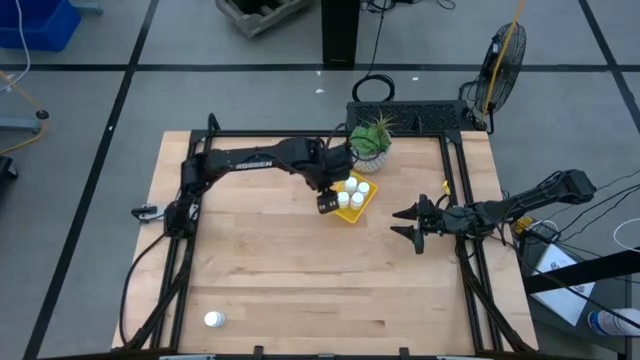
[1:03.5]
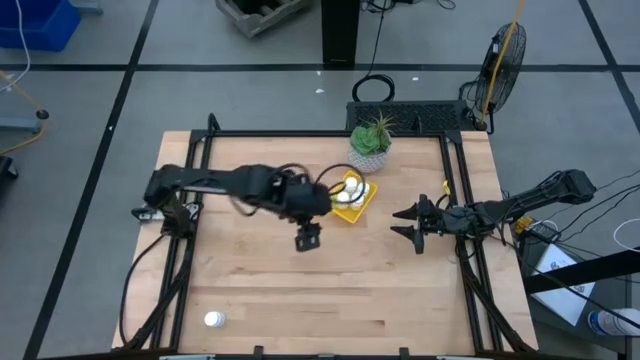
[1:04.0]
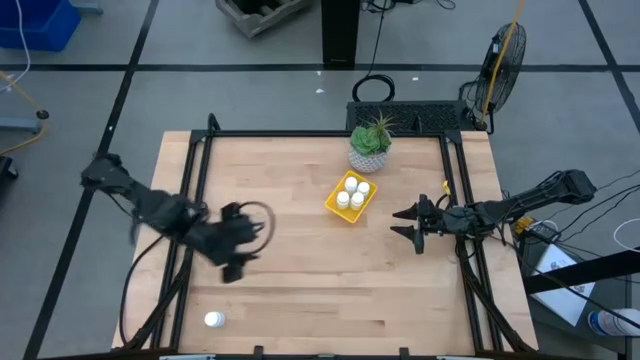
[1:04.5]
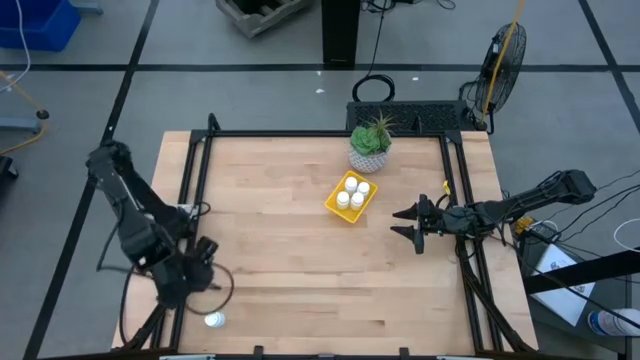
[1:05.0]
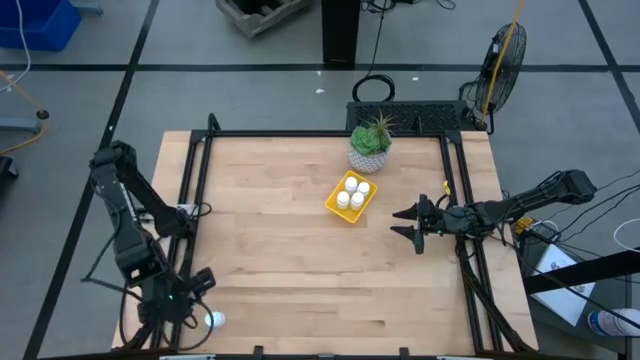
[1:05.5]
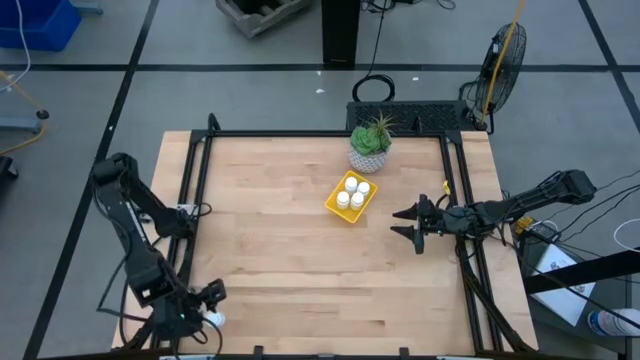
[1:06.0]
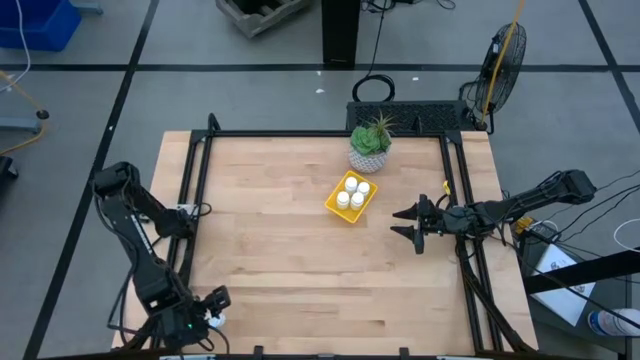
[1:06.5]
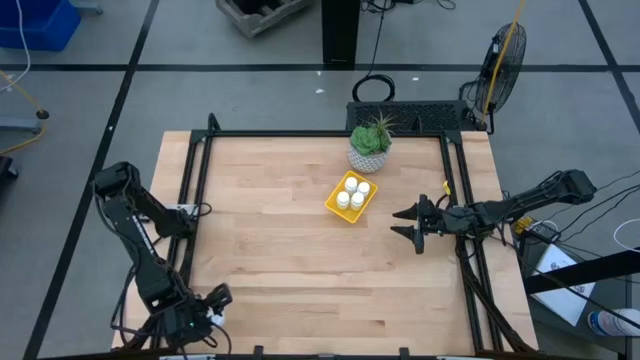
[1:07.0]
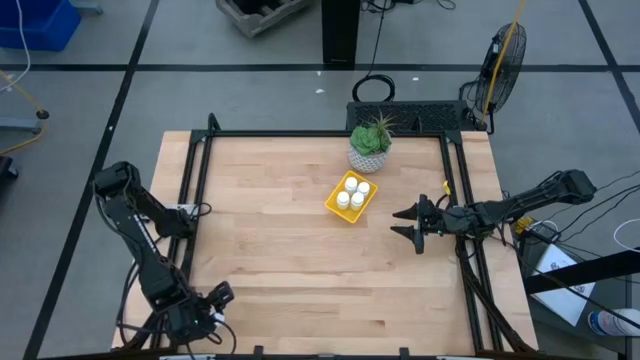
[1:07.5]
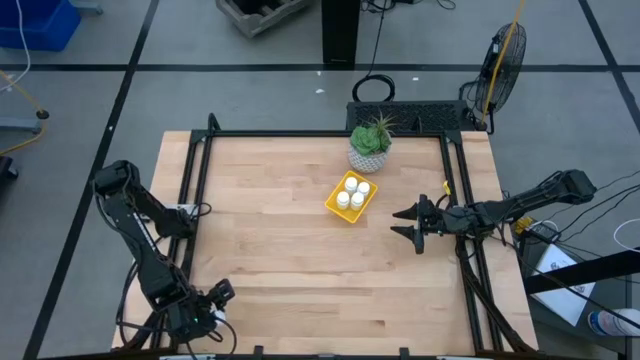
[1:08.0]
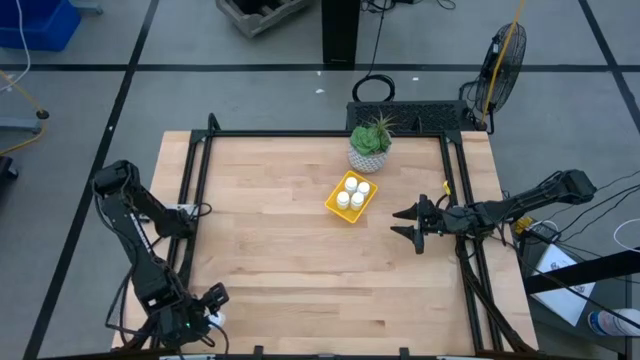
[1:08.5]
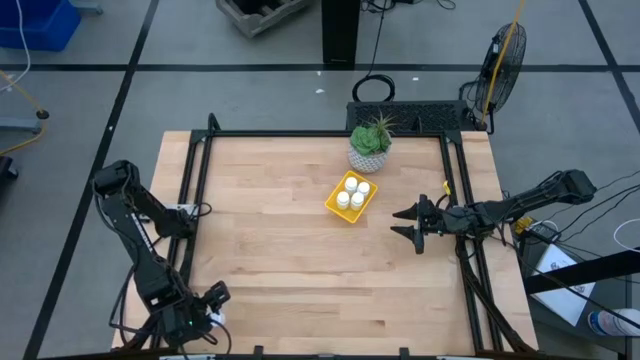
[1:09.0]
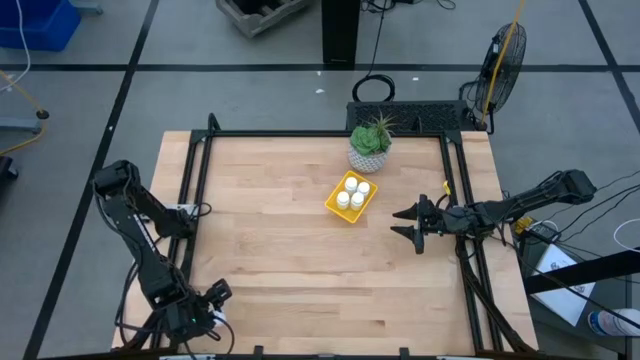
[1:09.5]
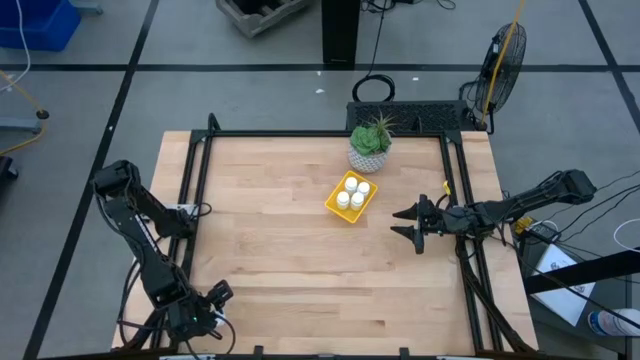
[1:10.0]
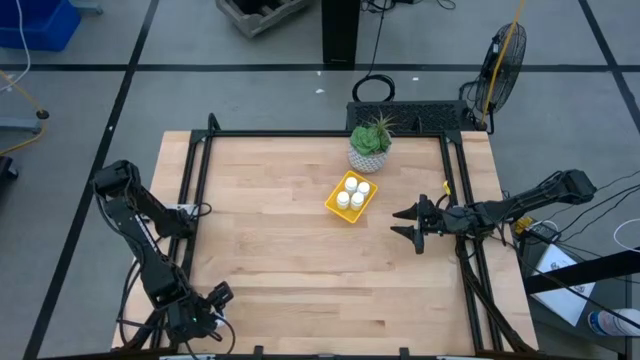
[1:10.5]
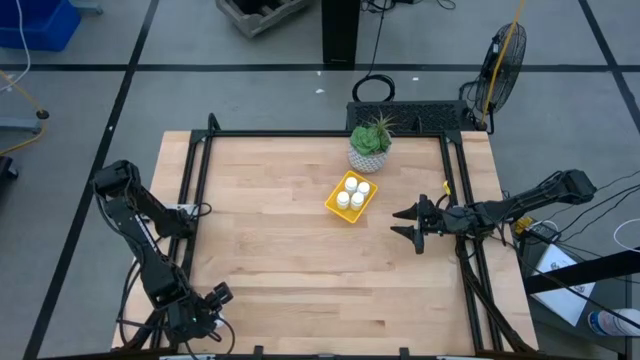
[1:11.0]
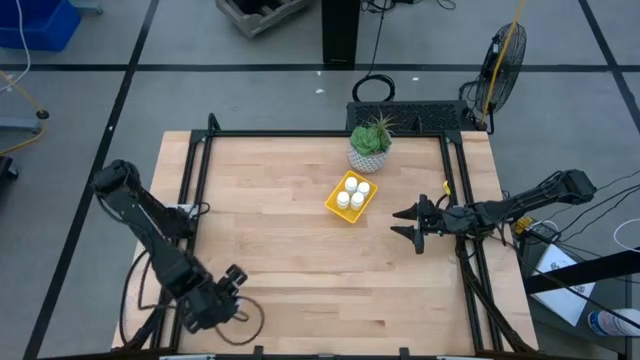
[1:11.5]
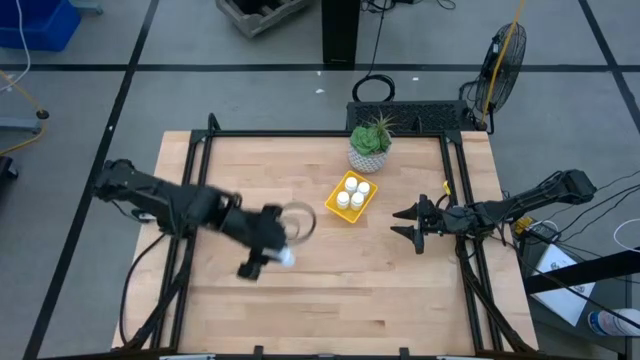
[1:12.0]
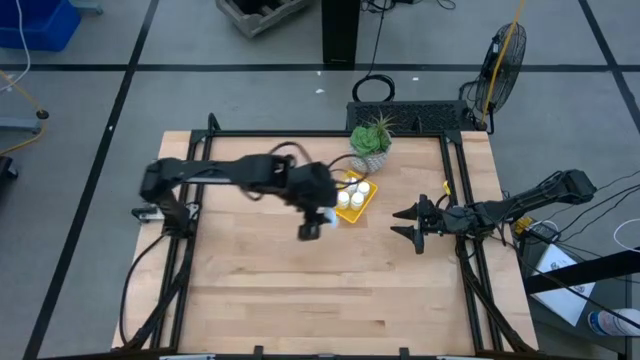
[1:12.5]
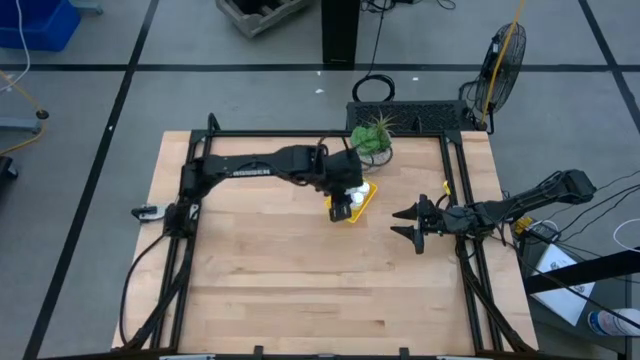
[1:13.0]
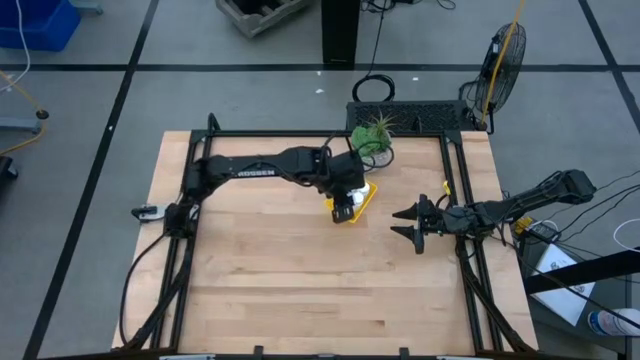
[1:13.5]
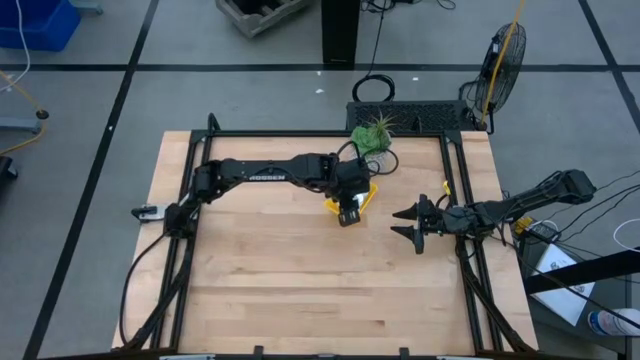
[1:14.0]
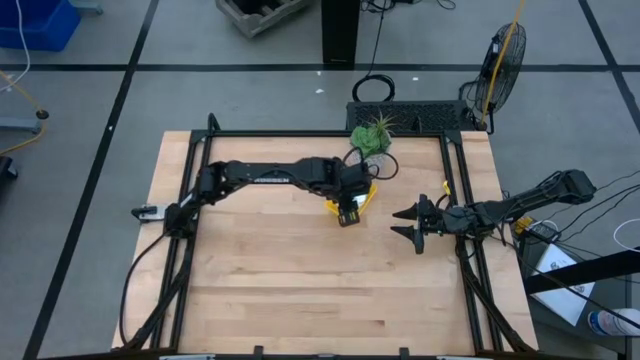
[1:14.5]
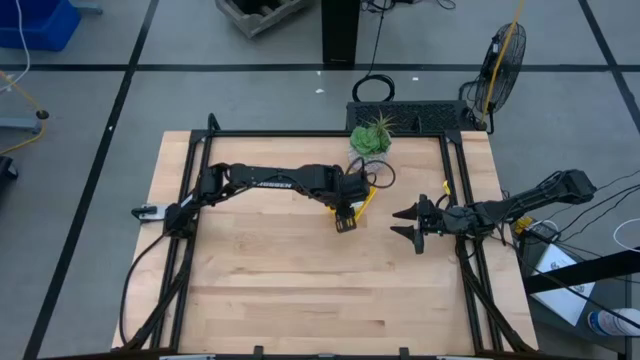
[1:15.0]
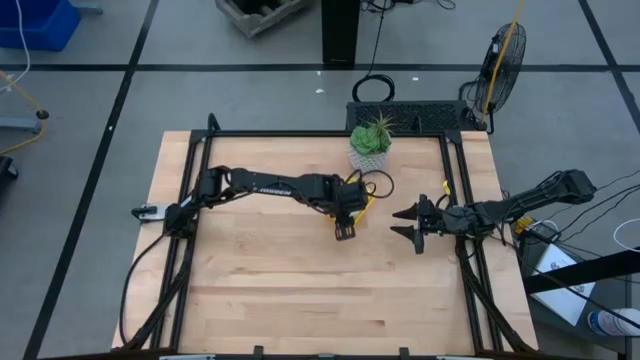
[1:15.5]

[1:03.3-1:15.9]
Task: Pick and place pill bottles into a basket
Put the white medicine bottle into the bin

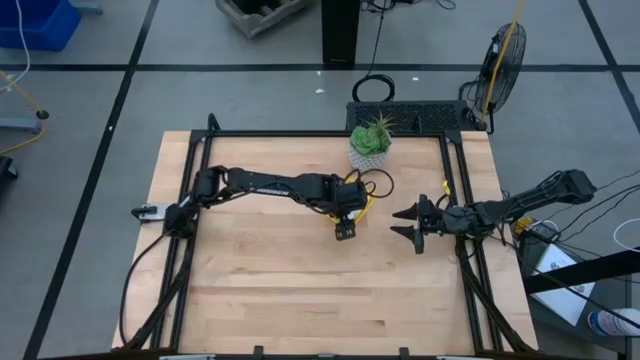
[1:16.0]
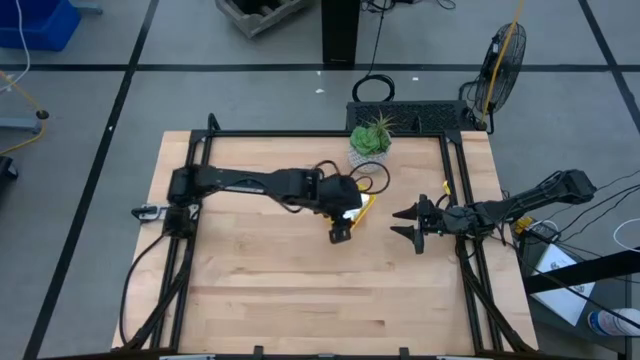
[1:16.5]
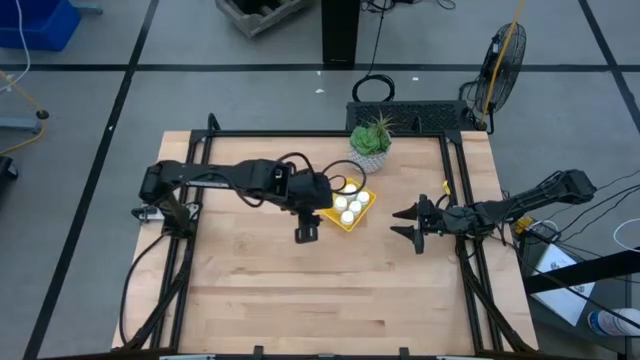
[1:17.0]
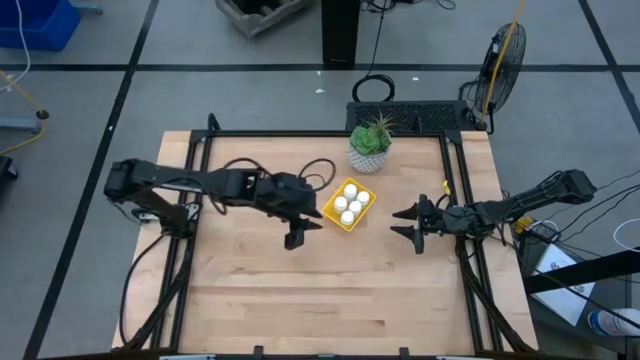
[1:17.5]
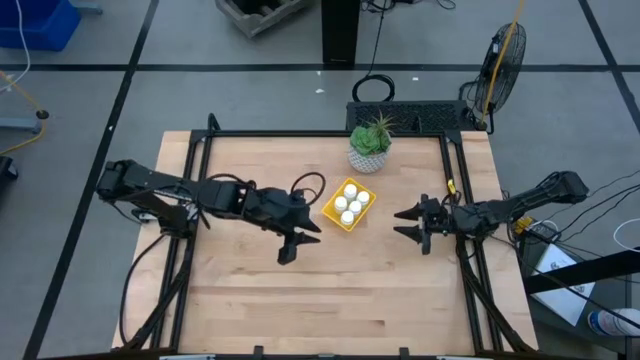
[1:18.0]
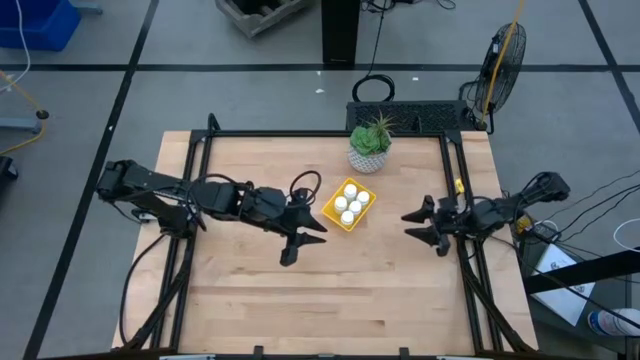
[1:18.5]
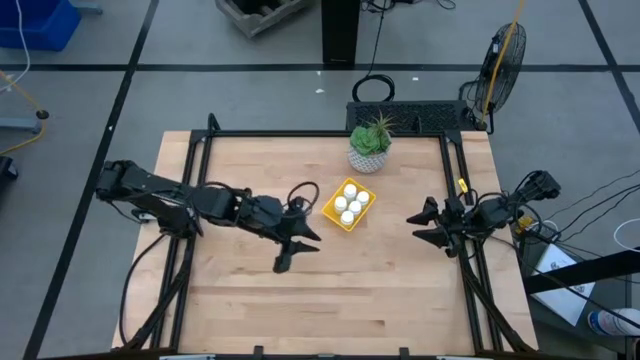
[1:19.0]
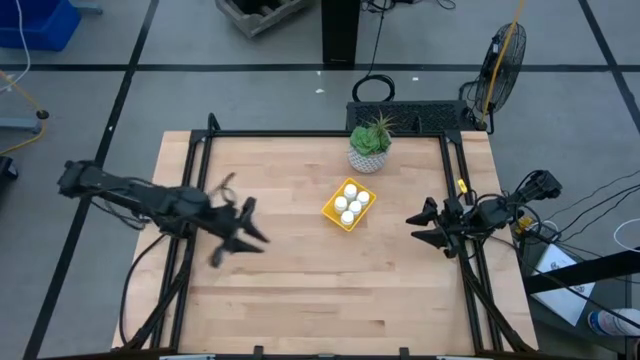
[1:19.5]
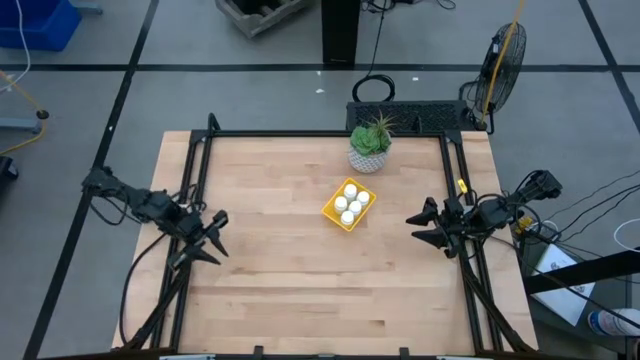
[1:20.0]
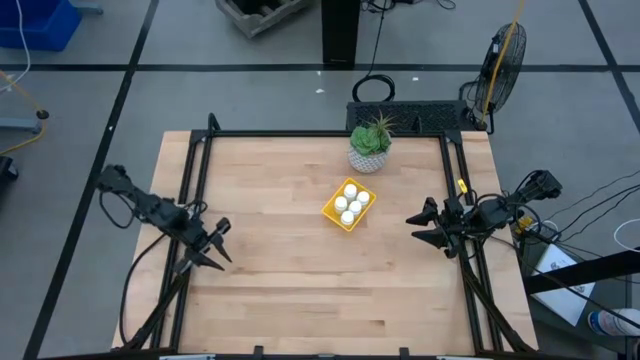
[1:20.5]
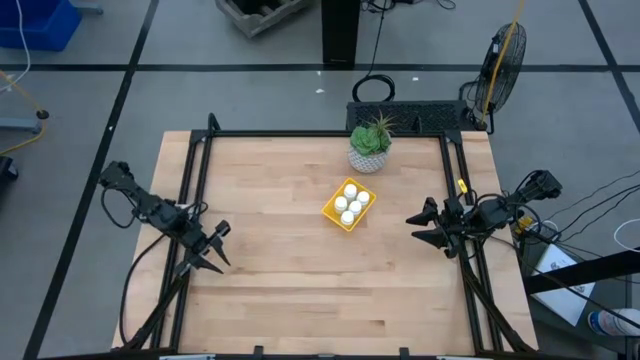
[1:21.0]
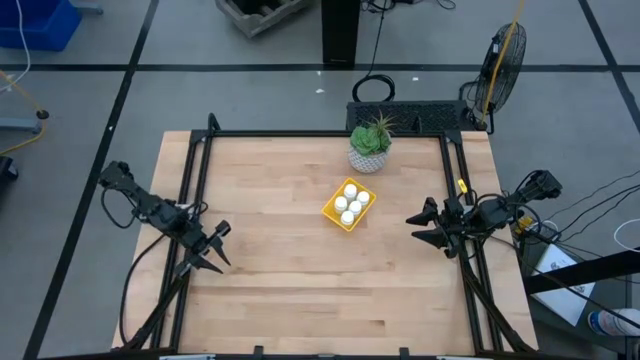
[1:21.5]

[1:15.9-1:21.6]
Return to Home Position

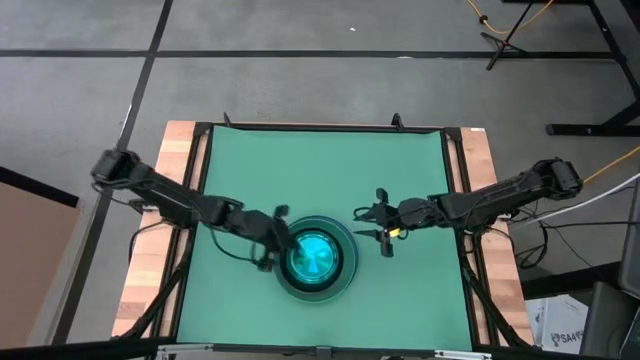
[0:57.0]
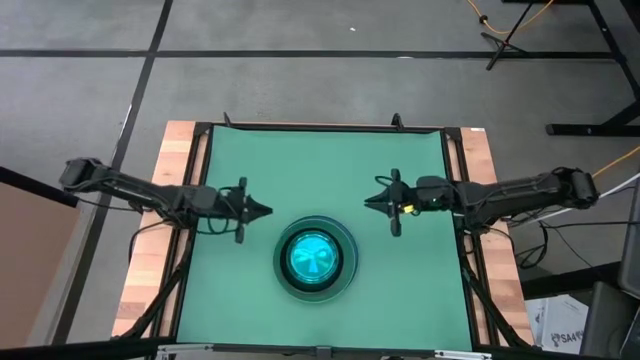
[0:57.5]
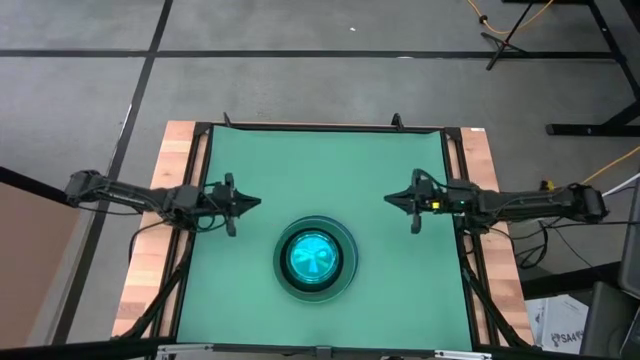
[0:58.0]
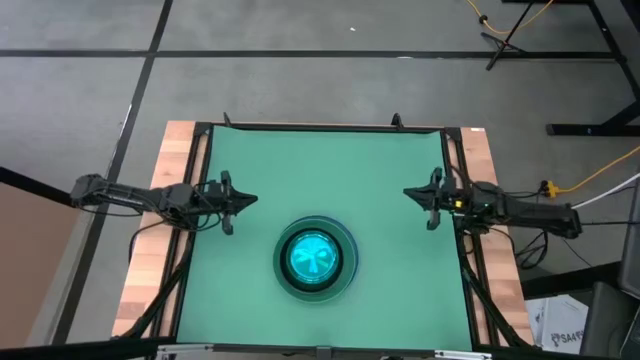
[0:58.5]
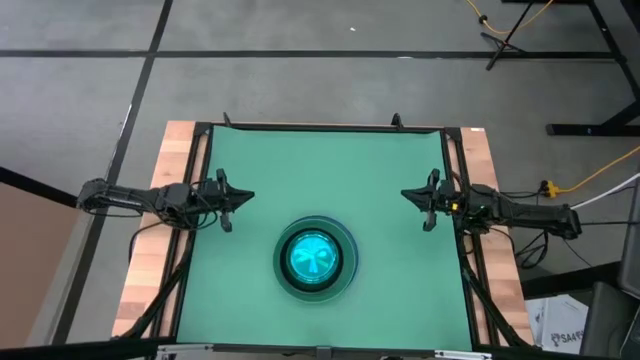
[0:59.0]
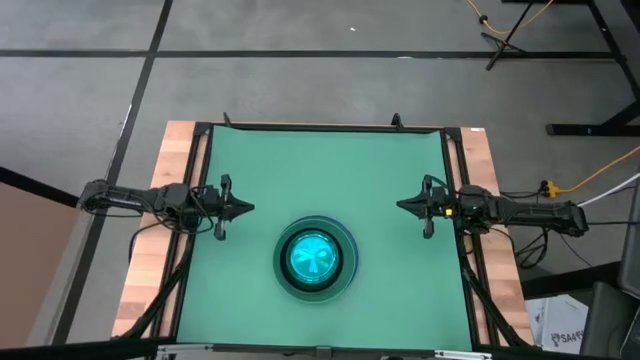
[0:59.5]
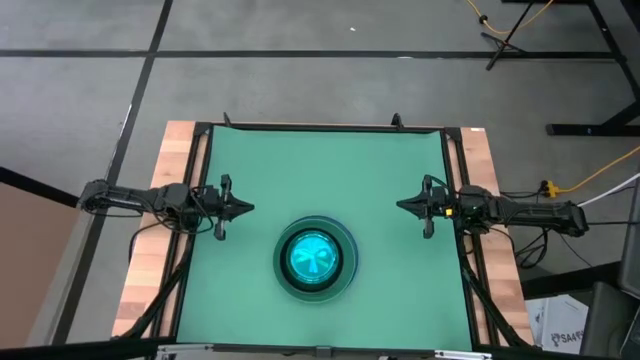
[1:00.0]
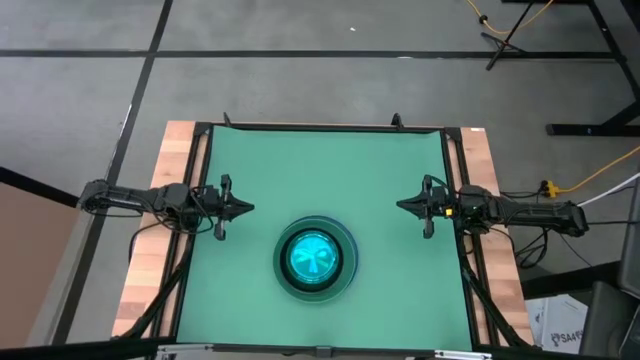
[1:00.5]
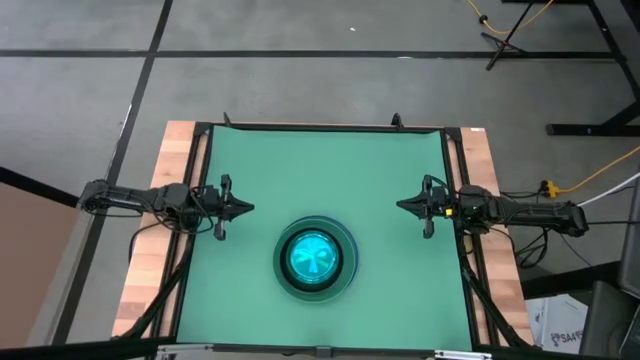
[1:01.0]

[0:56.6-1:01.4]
Task: Stack plastic plates
Return to Home Position
